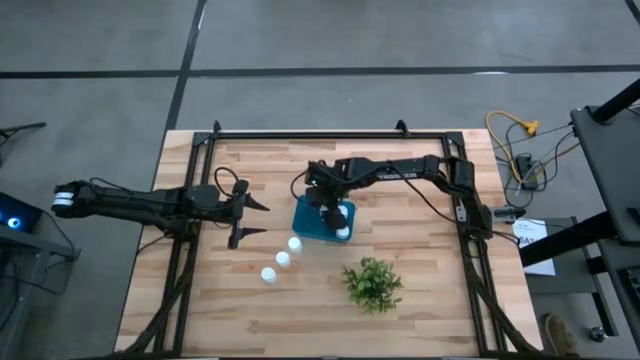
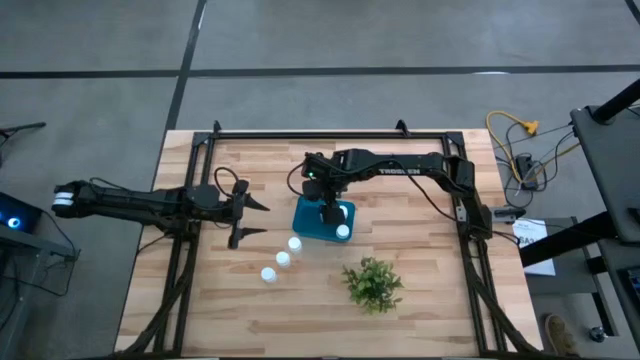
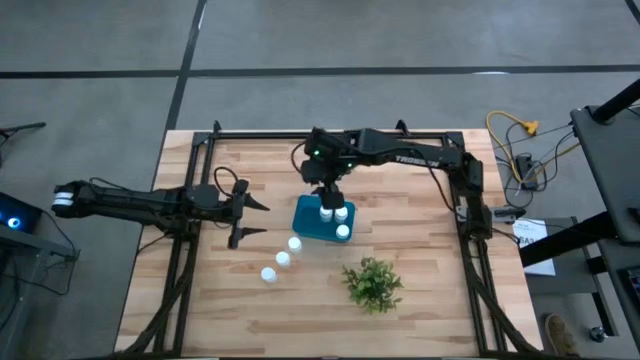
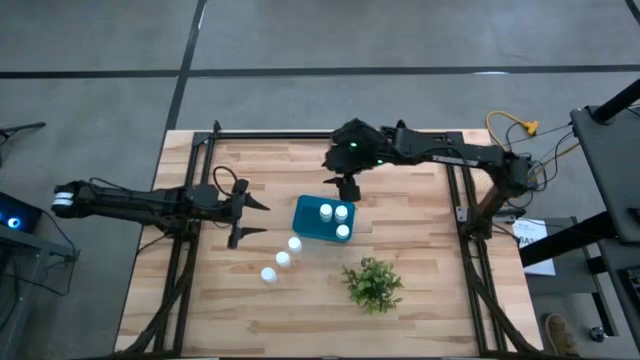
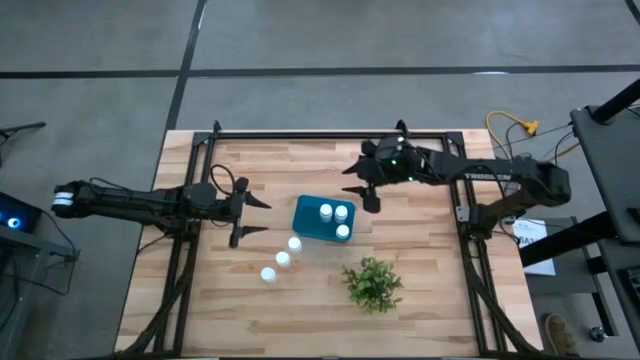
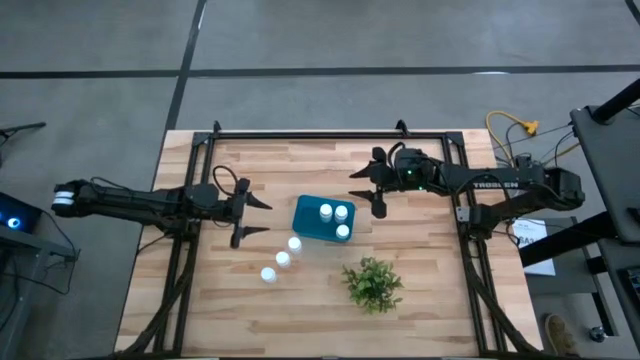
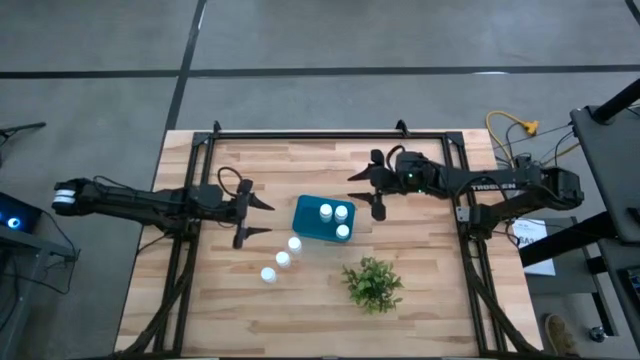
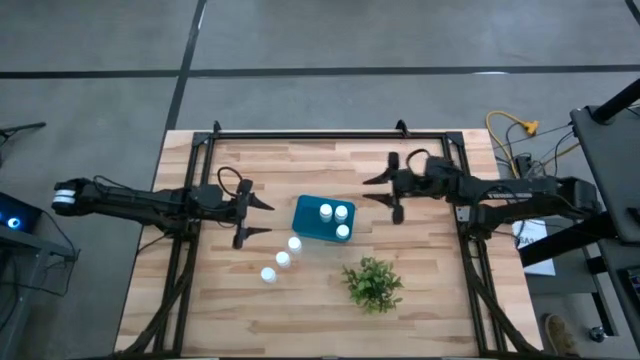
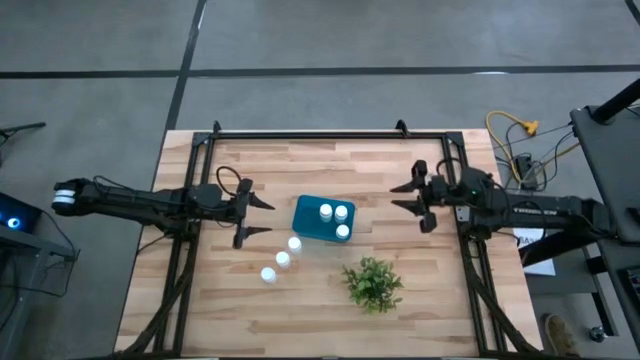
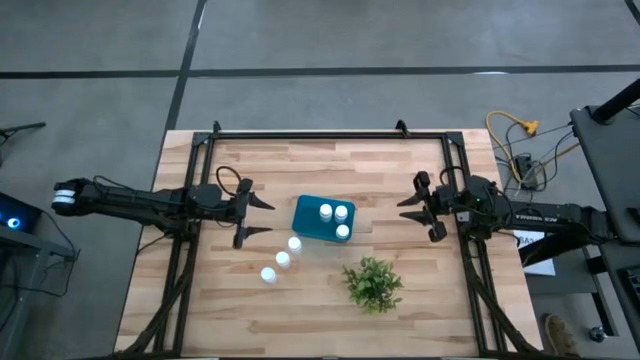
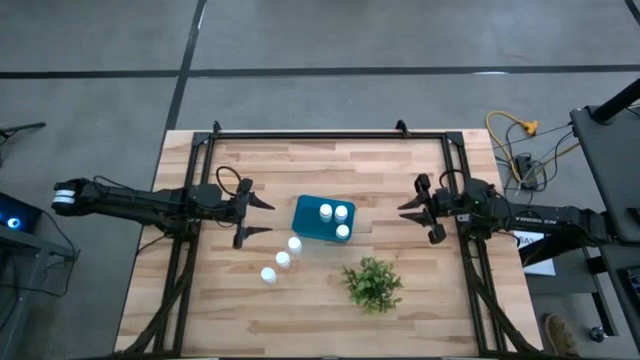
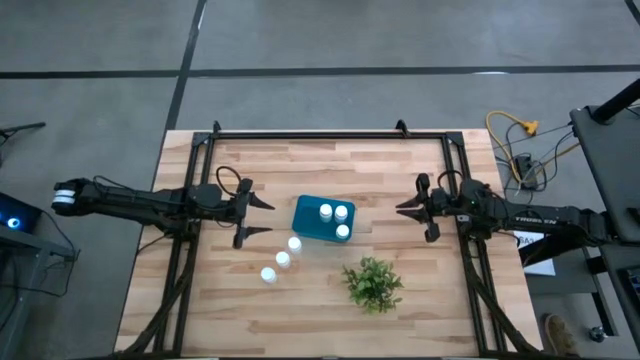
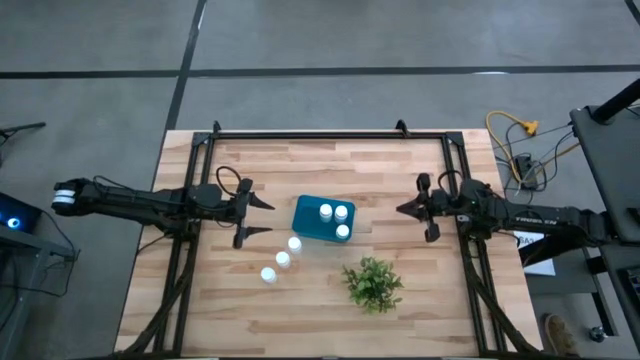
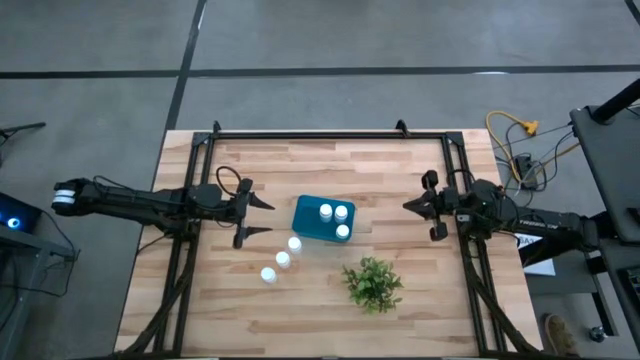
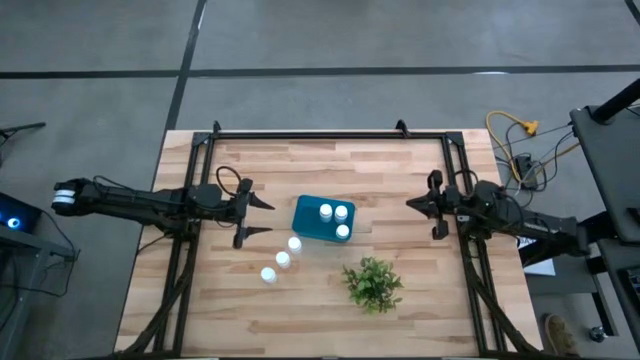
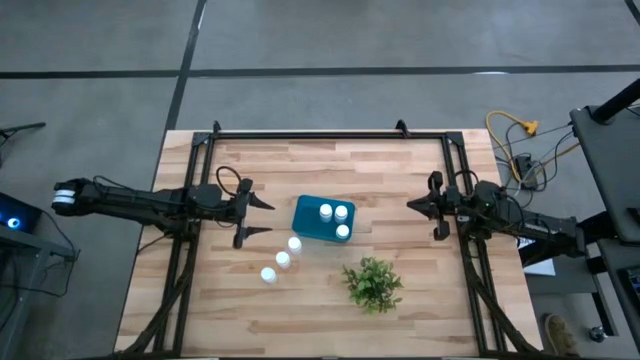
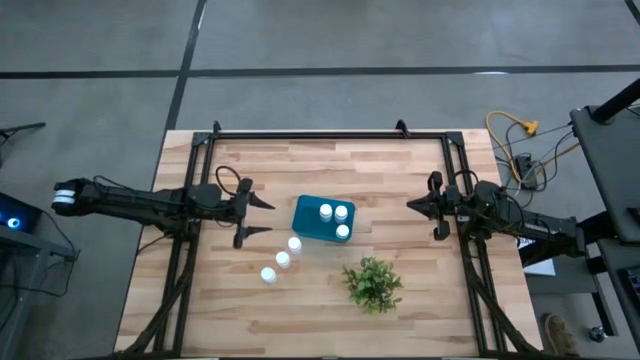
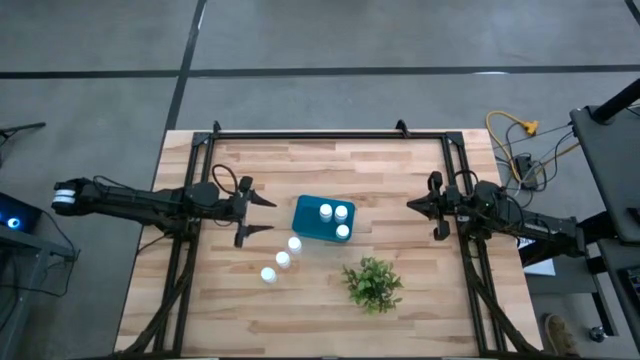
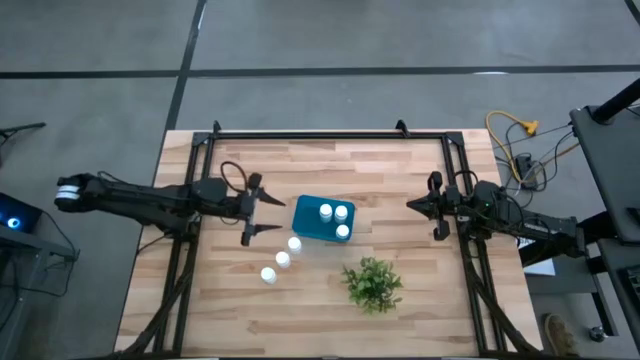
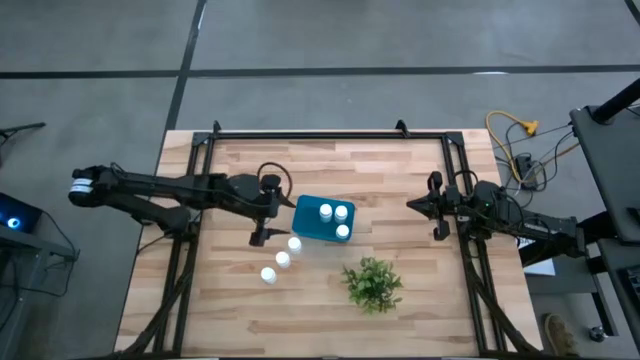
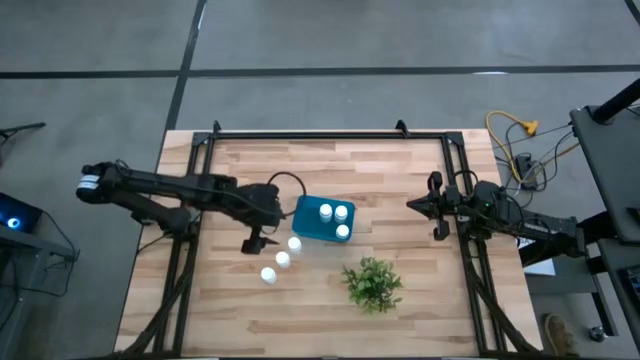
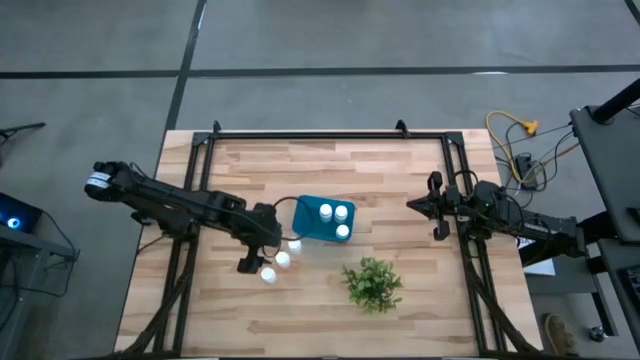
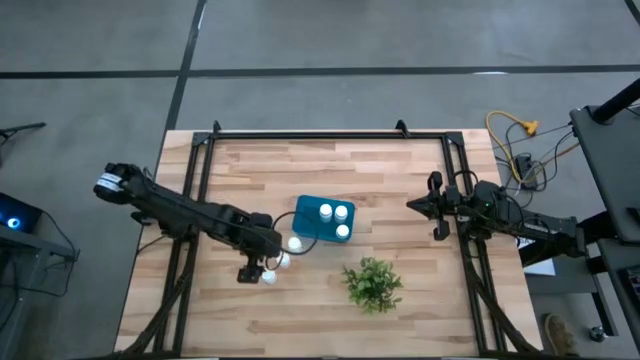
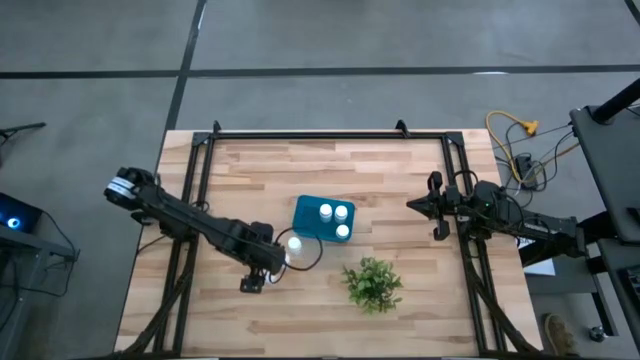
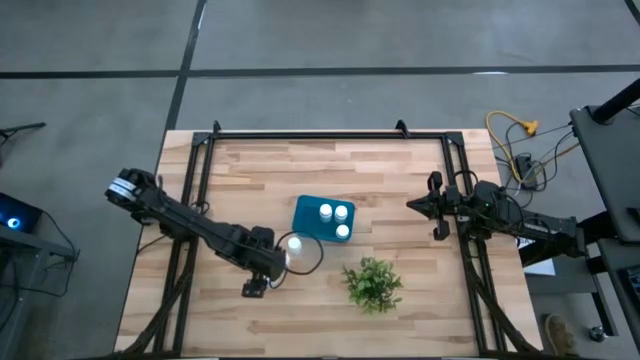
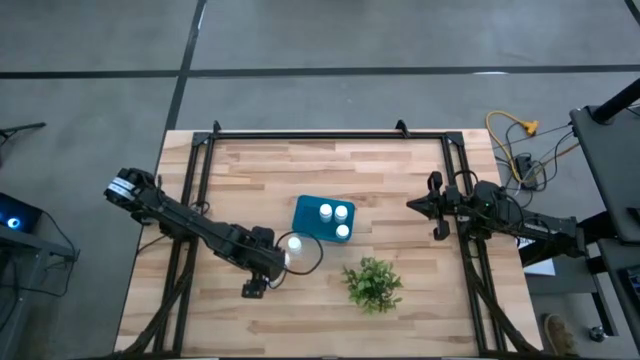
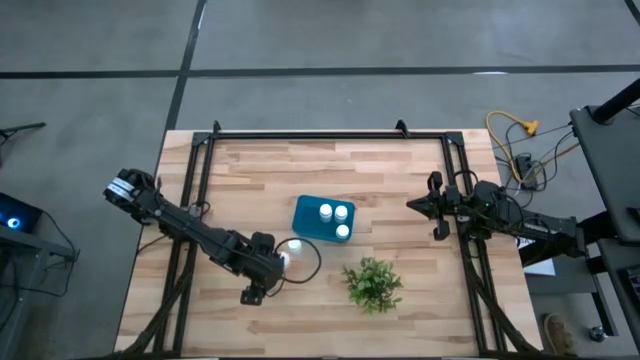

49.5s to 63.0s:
Task: Pick and place pill bottles into a basket
Put the white pill bottle in the blue bin

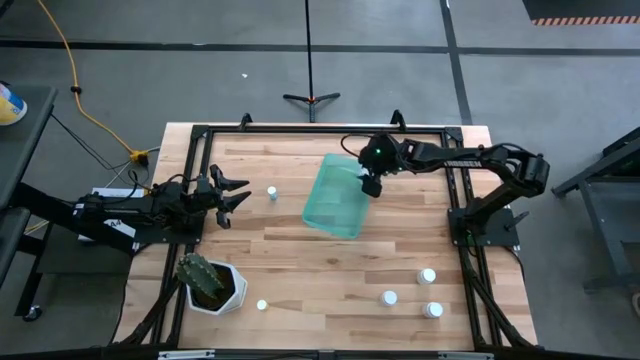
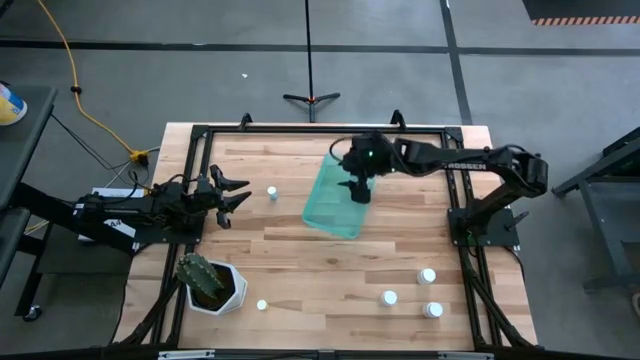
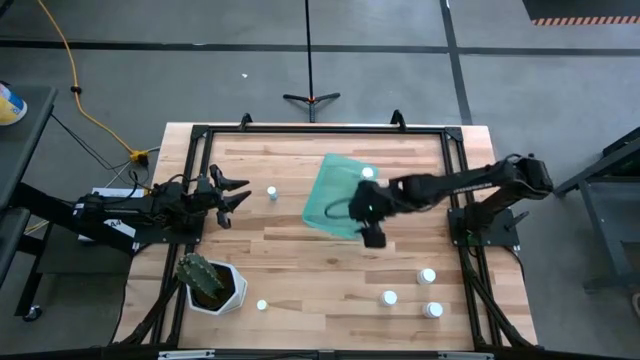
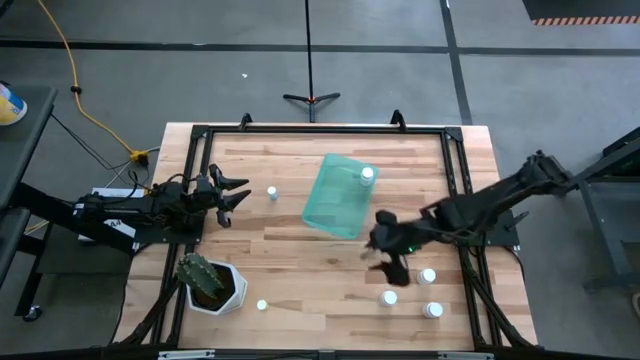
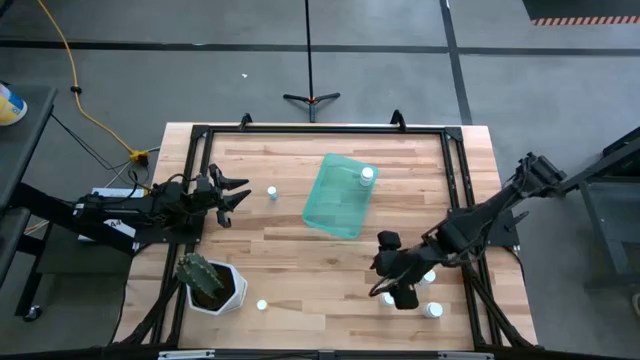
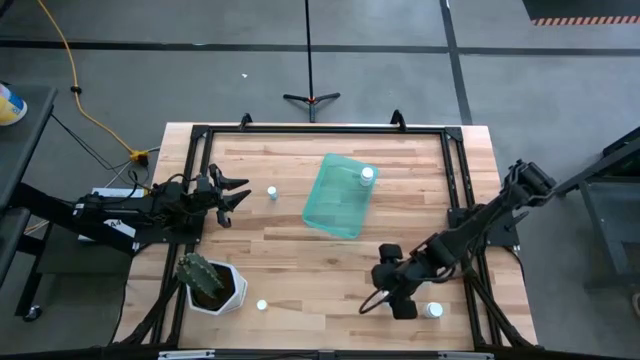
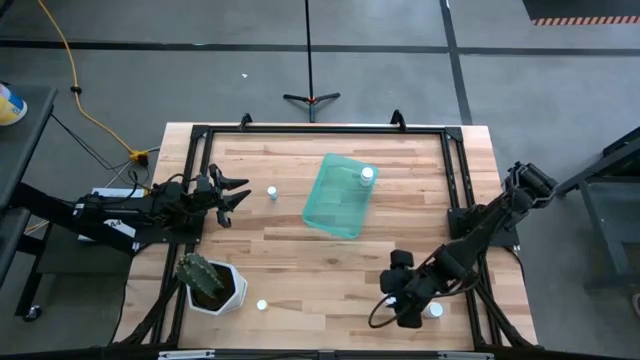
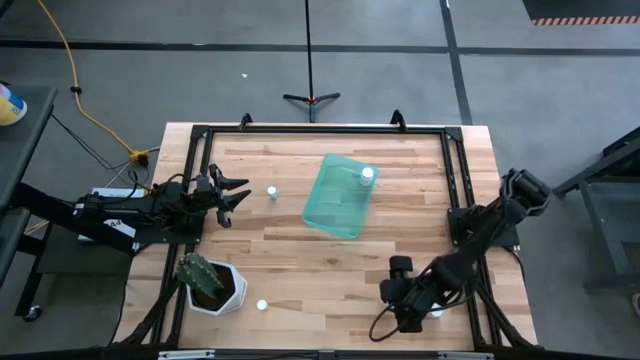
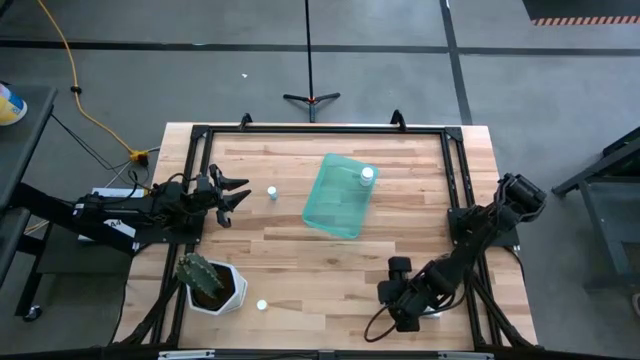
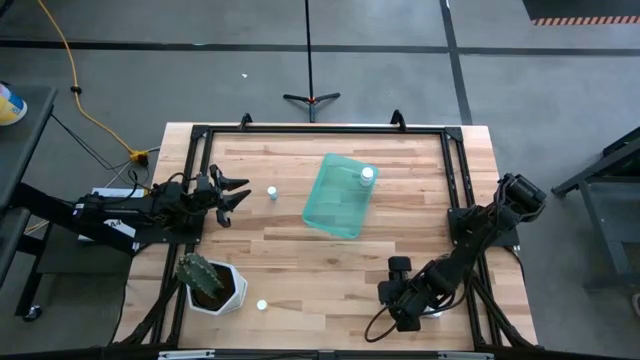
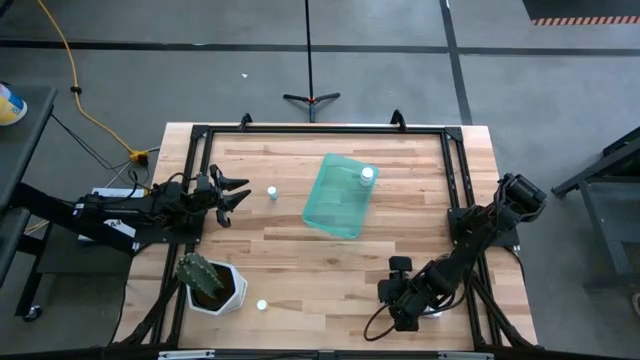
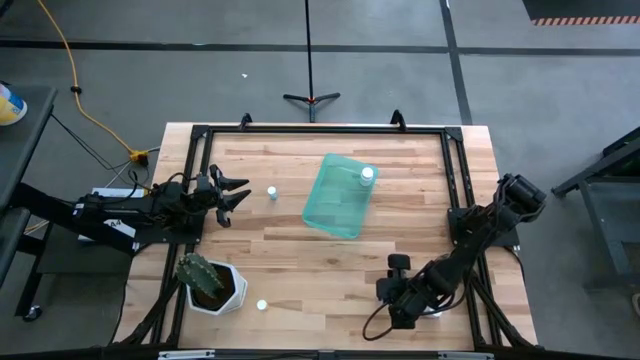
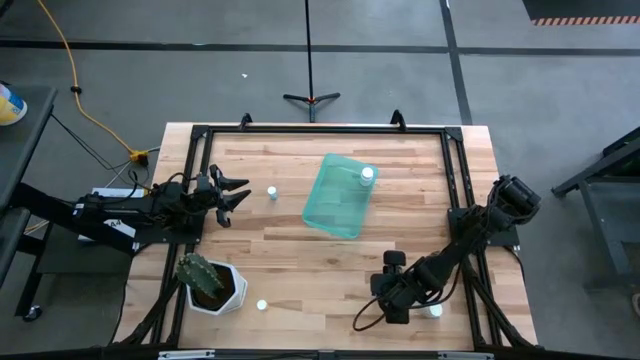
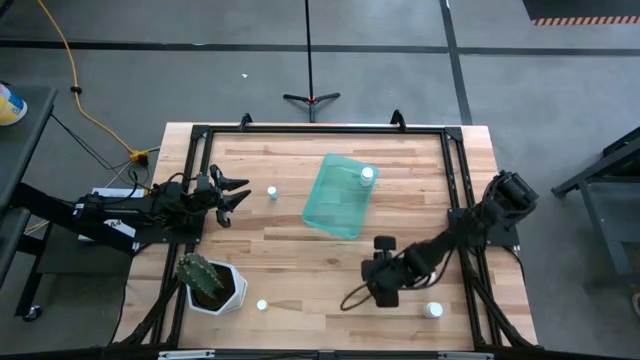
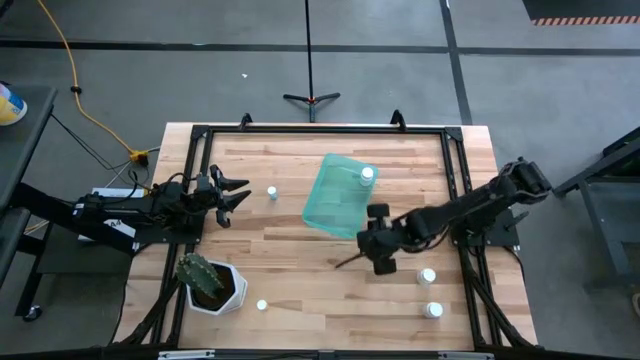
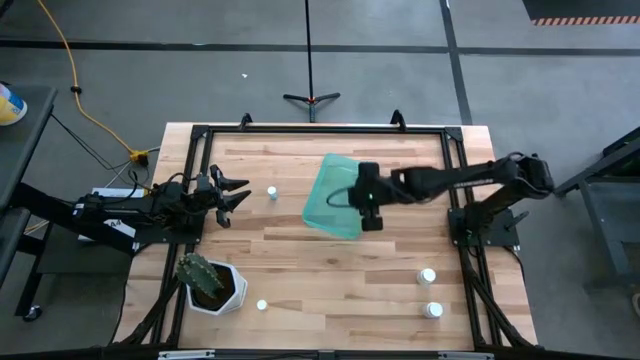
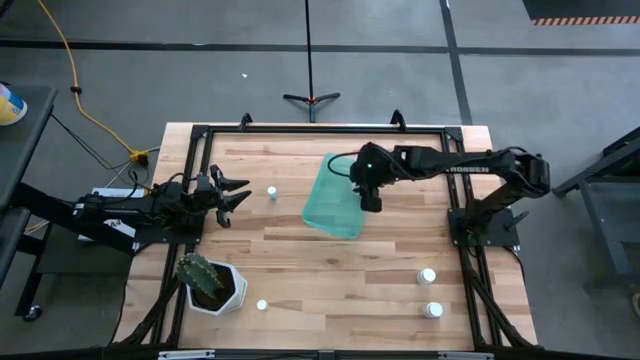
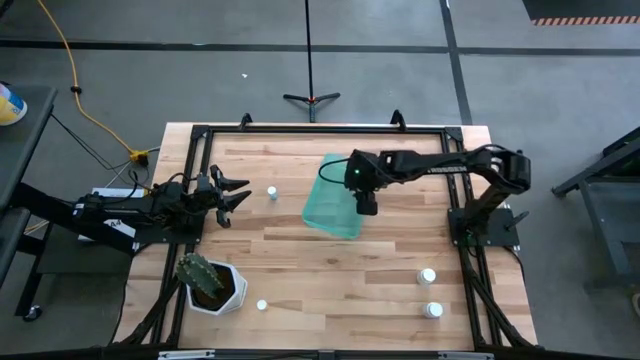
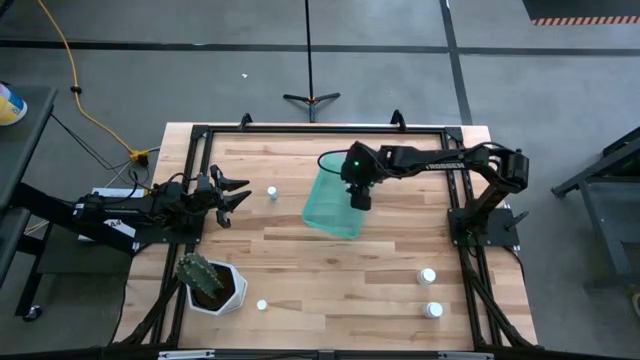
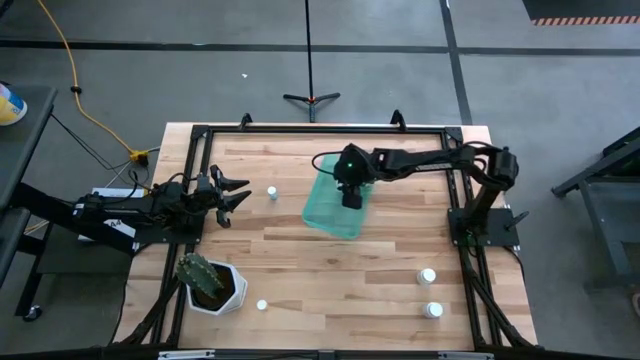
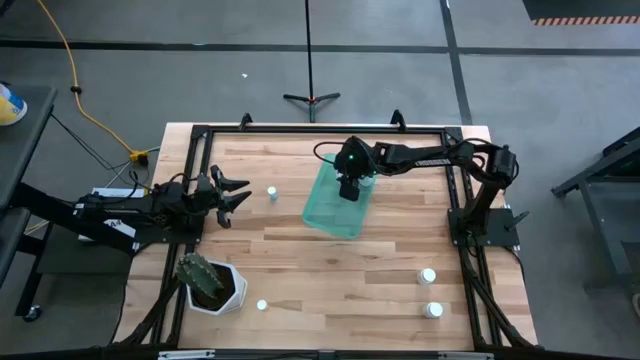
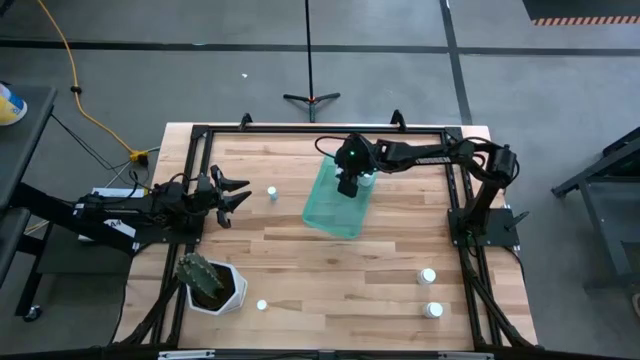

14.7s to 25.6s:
Task: Pick and place pill bottles into a basket
Put the middle white pill bottle into the blue bin
